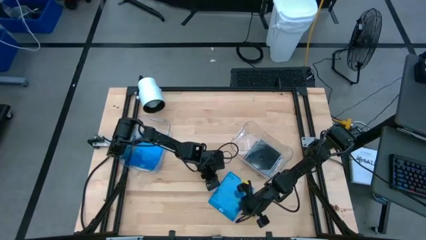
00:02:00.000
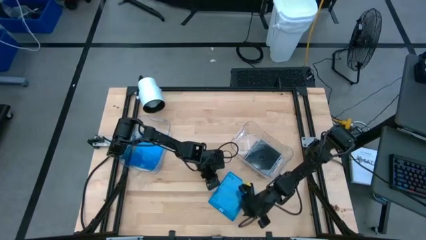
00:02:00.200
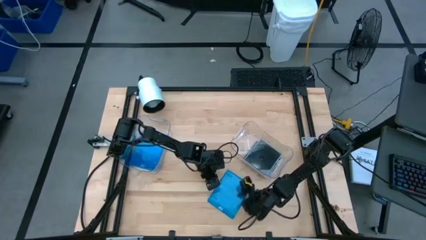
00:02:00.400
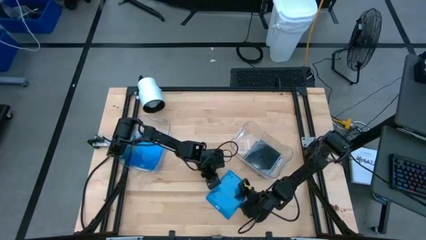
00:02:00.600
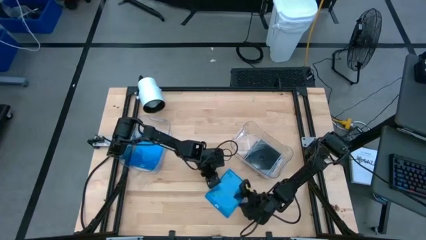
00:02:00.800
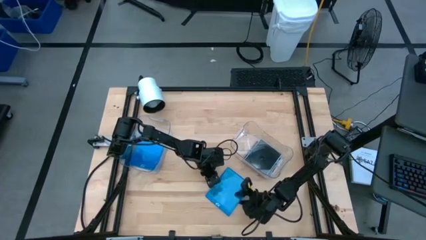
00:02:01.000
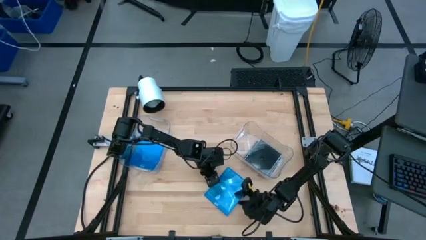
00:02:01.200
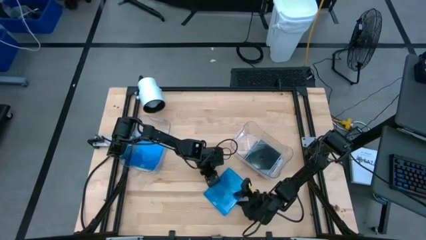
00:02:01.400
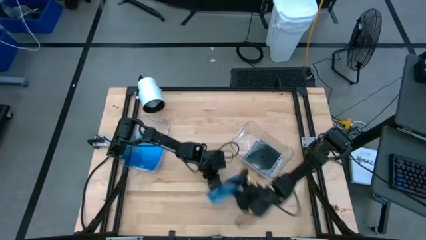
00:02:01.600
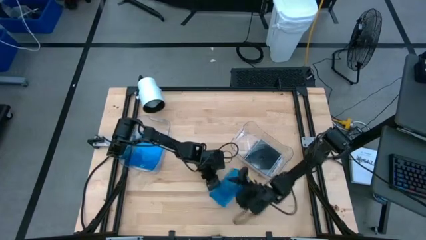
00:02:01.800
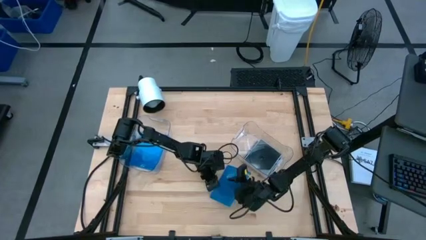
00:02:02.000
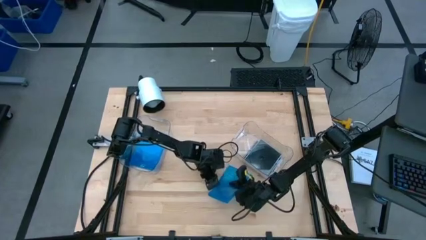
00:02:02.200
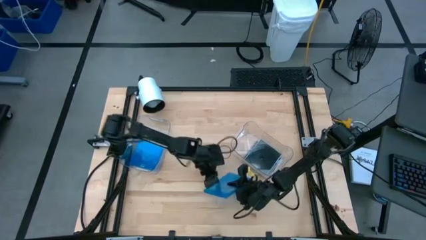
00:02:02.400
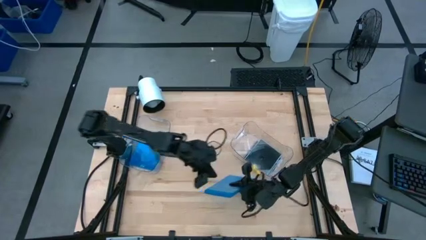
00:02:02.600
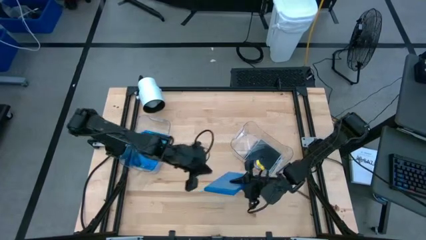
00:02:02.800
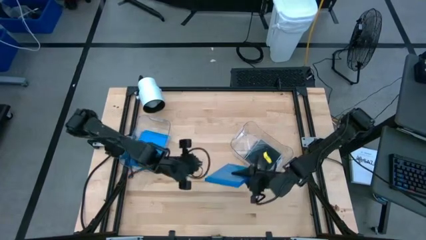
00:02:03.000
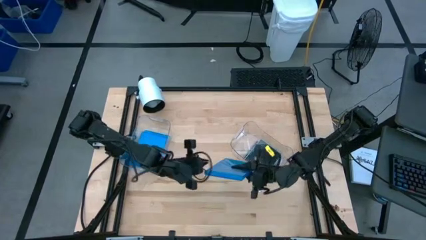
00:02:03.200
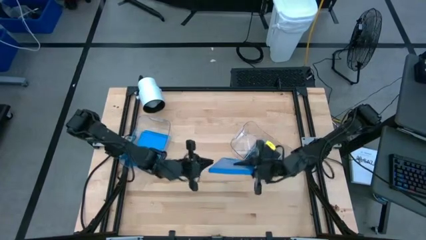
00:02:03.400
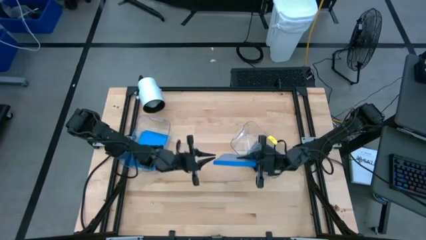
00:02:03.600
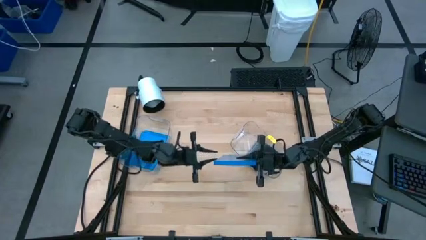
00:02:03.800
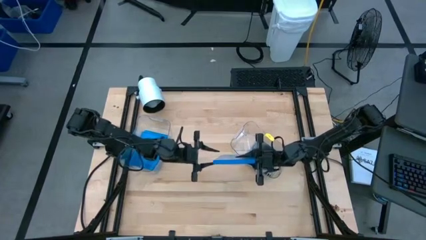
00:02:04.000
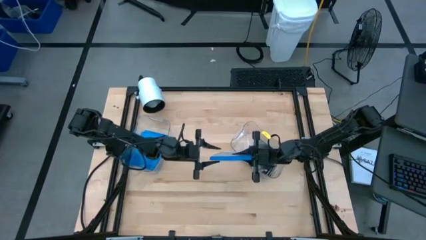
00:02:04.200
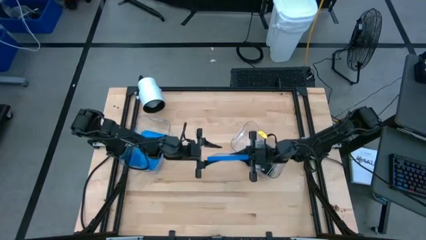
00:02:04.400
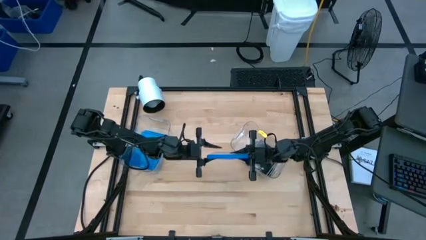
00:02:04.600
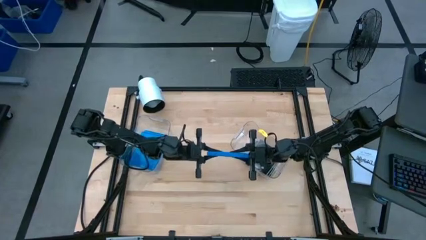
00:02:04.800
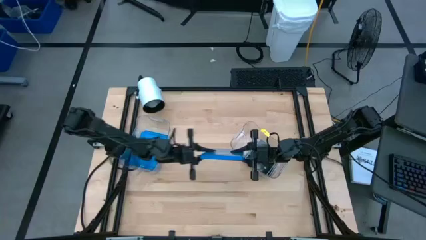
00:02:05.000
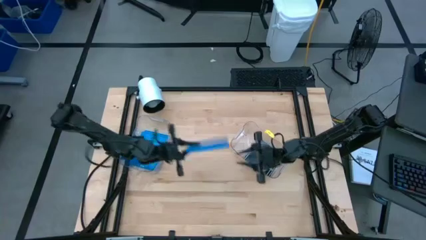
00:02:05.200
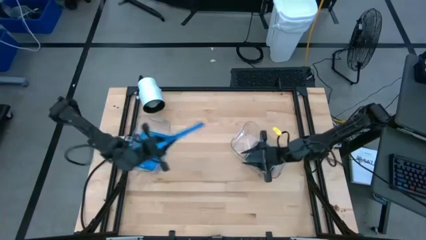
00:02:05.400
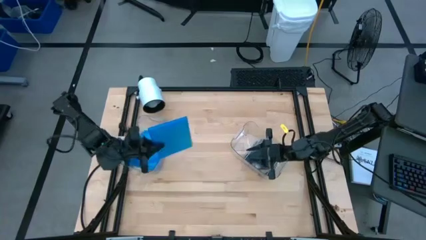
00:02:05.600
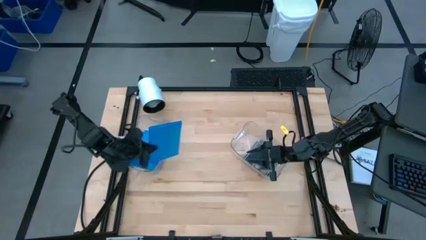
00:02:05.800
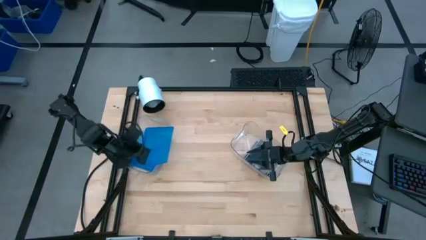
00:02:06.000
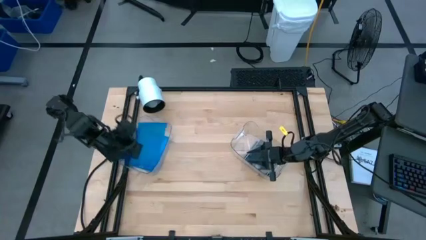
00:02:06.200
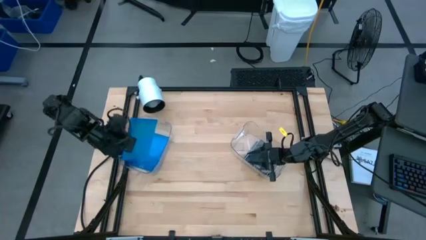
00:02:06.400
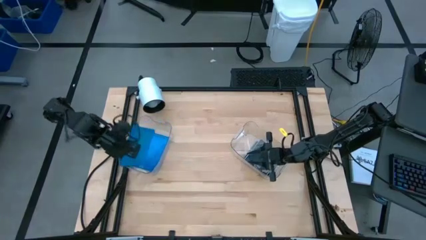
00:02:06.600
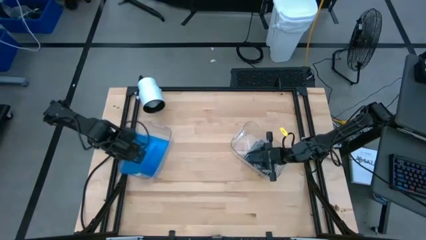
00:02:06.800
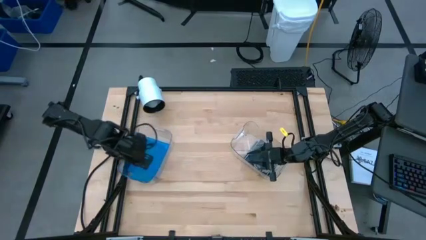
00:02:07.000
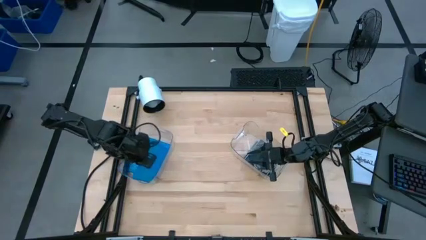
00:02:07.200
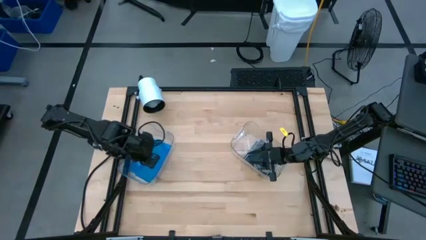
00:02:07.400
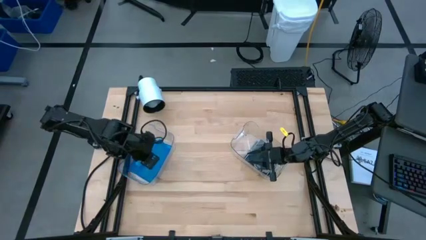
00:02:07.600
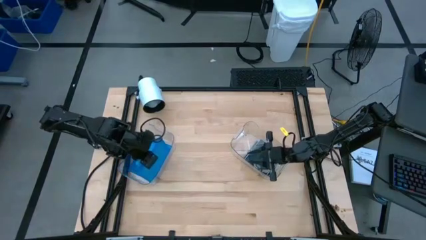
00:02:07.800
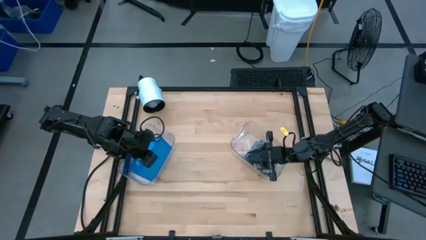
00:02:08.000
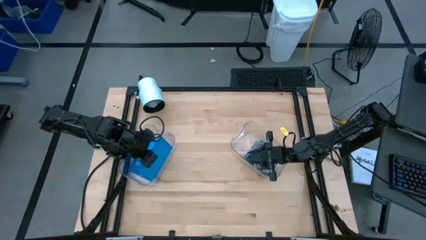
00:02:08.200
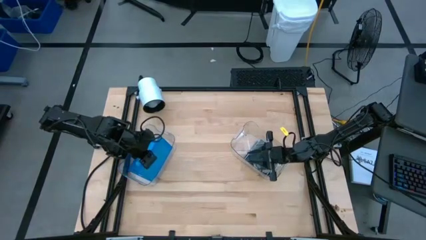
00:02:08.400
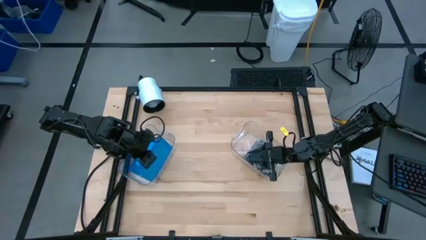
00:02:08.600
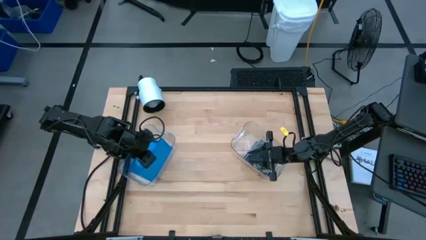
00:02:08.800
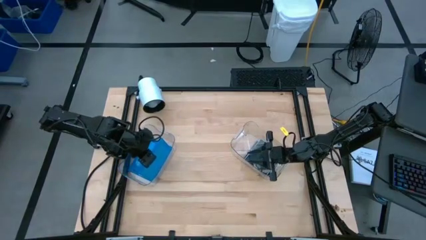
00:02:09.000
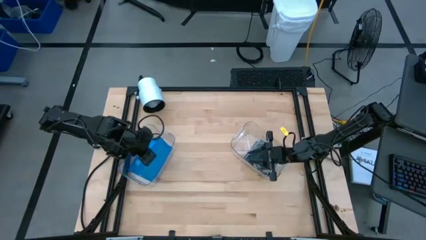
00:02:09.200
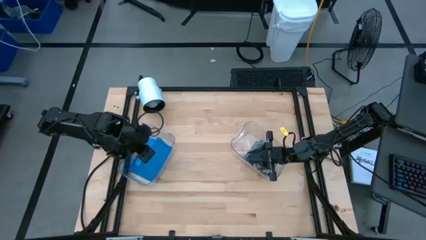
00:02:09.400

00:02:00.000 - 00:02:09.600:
Task: Pick & place jewel cases by type
Put the blue CD case into the left transparent bin

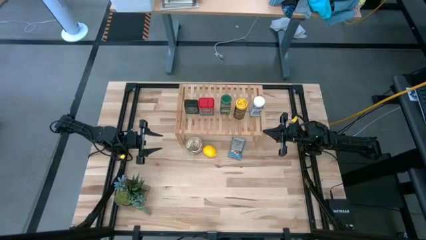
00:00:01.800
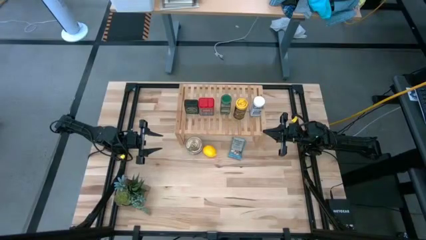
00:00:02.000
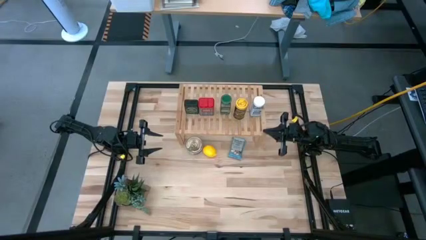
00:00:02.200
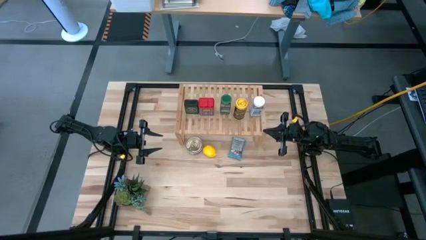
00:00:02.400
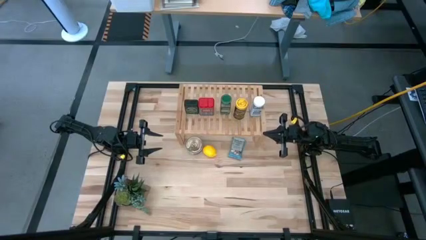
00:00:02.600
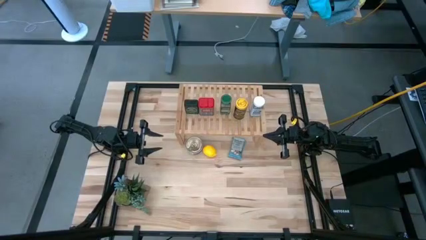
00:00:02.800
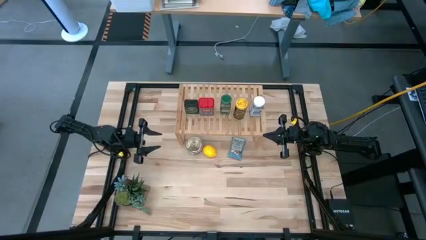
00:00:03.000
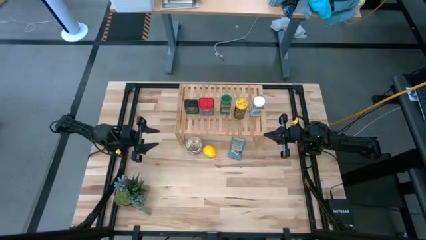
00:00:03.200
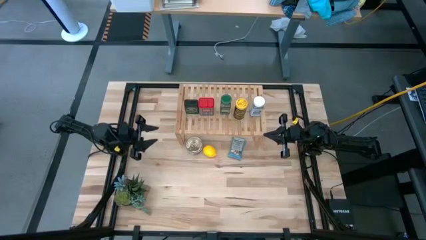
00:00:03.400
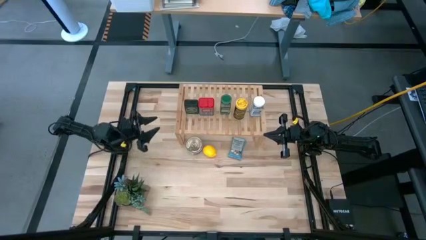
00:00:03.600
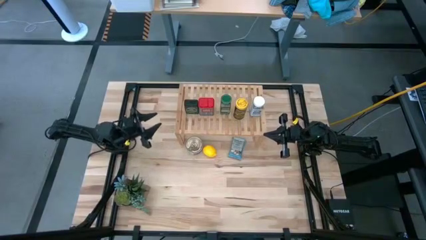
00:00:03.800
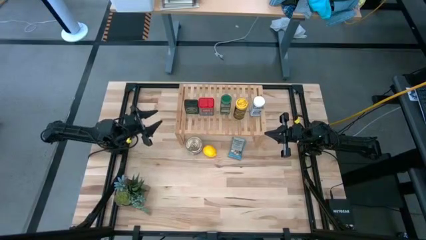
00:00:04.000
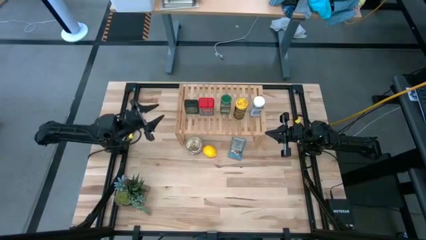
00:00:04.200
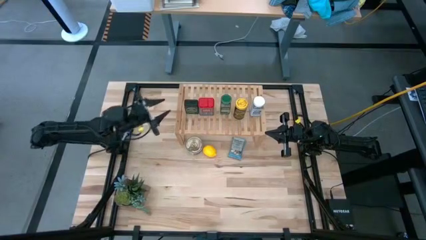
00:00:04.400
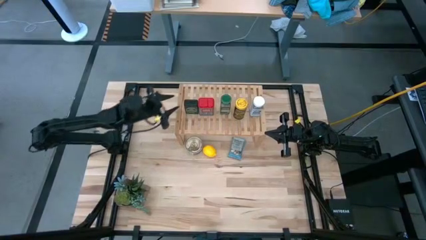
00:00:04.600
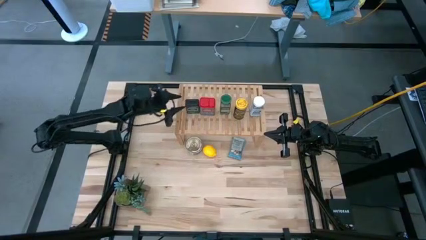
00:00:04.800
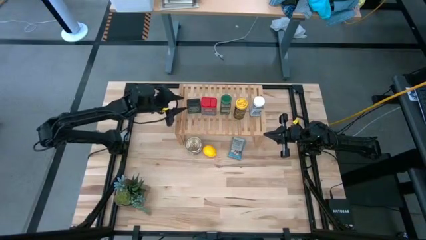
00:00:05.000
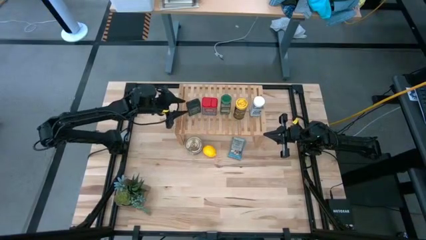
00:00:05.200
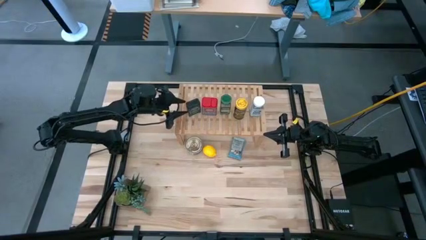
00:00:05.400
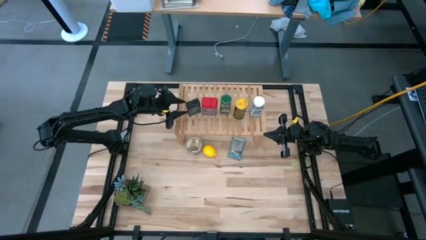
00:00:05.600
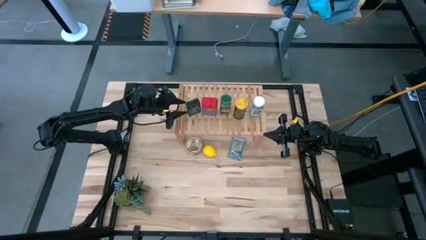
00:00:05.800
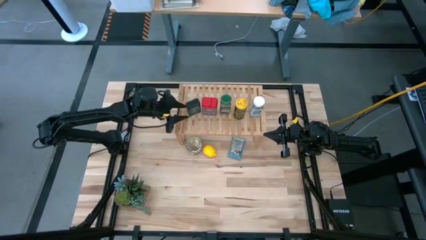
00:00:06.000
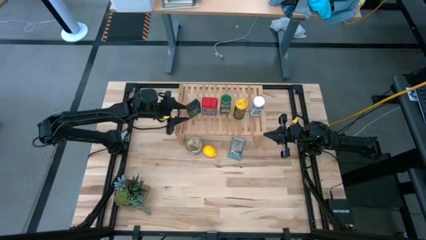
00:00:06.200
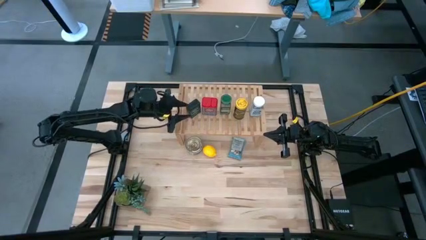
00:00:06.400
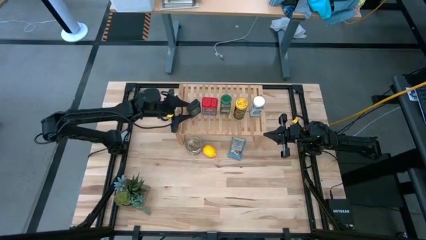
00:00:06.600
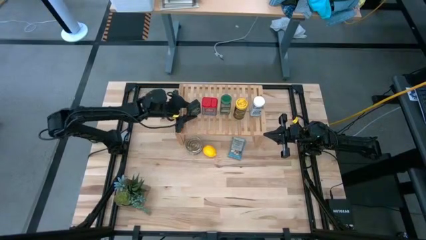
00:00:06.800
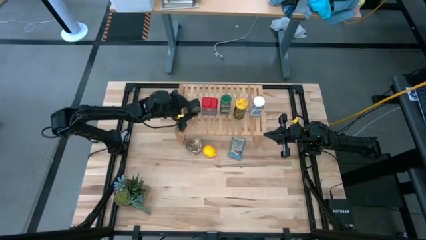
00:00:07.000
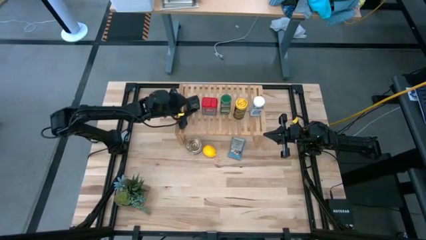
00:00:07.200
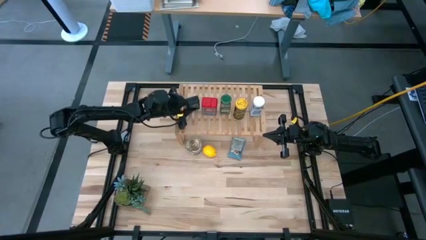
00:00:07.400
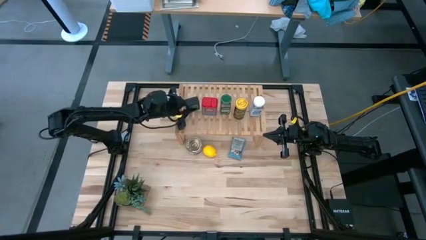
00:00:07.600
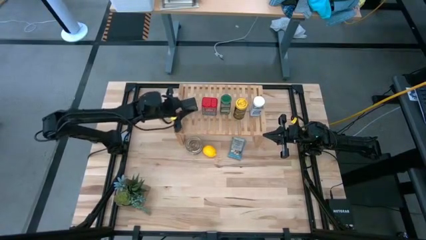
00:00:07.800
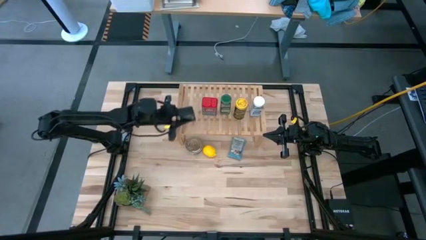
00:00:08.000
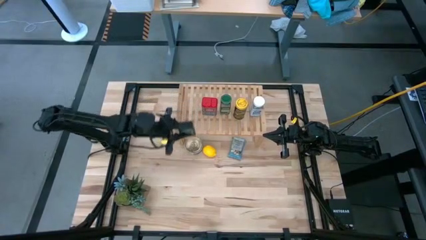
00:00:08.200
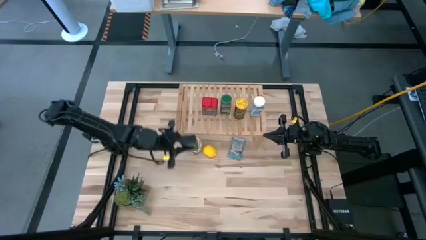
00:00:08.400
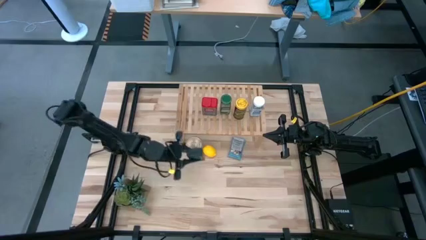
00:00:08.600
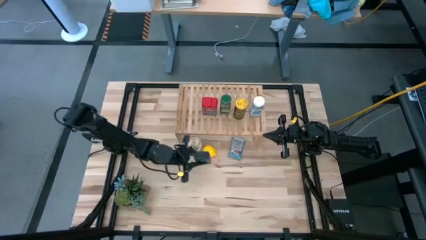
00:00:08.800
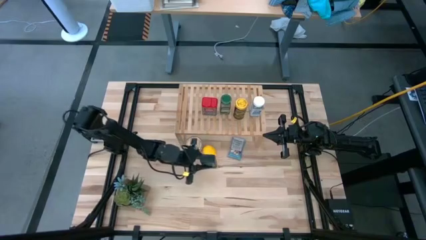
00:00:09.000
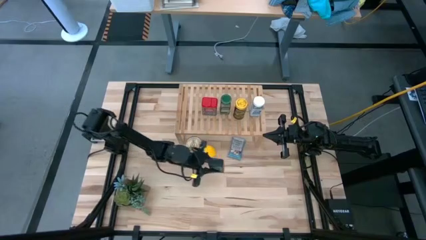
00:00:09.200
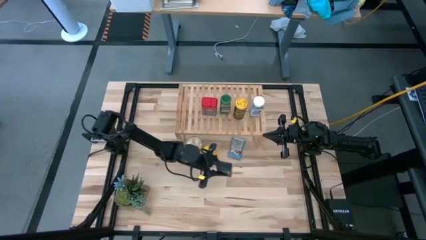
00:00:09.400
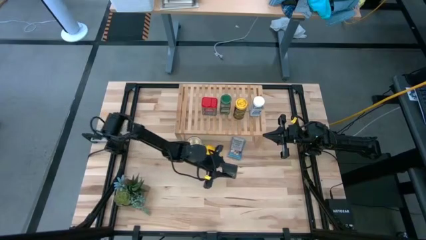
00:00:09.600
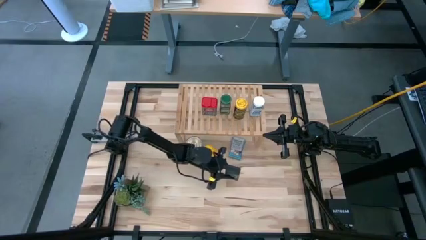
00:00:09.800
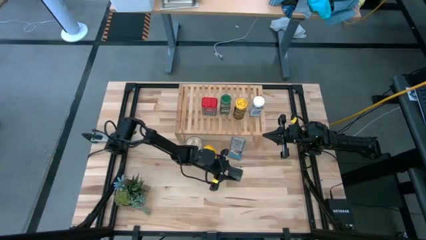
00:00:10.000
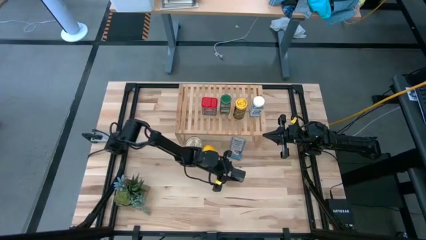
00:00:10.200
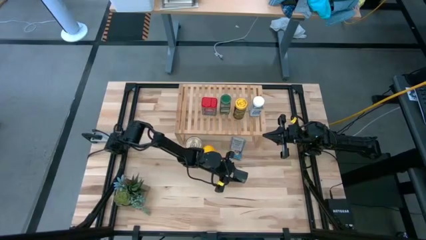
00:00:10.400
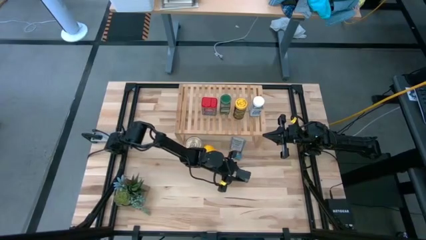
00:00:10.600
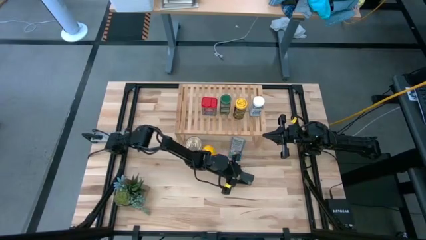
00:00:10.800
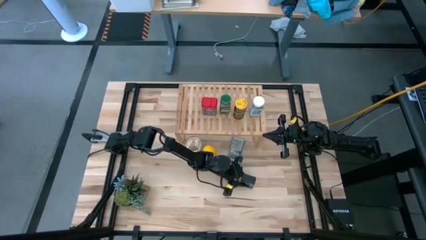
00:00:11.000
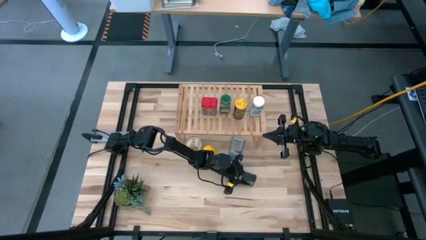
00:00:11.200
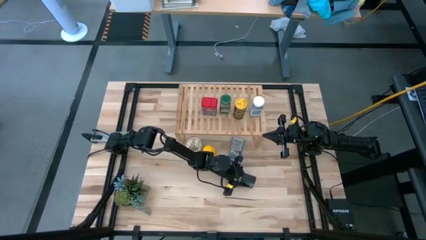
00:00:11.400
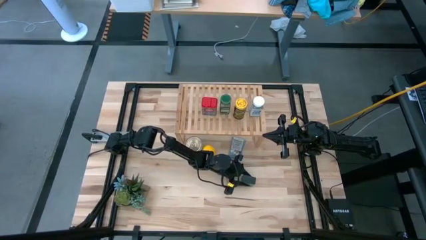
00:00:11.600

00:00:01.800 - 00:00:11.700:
Task: Shelf spices
Remove the black seasoning can from the shelf
